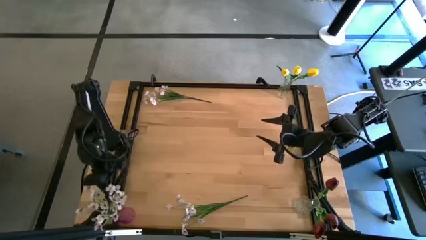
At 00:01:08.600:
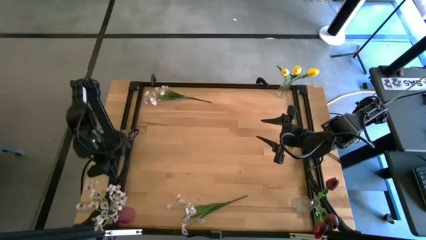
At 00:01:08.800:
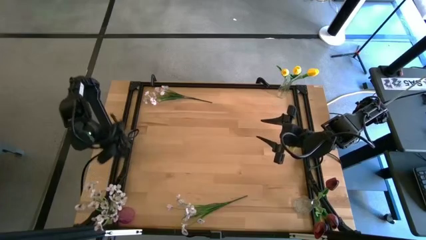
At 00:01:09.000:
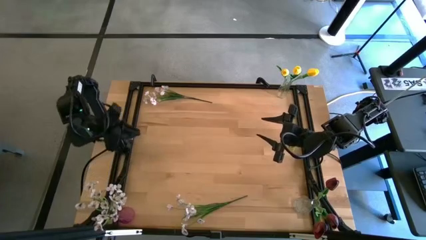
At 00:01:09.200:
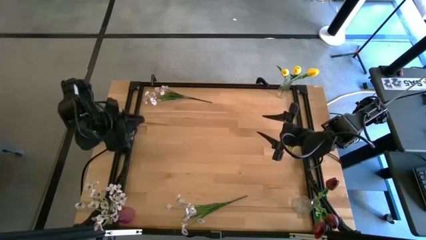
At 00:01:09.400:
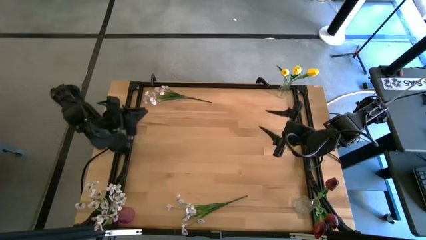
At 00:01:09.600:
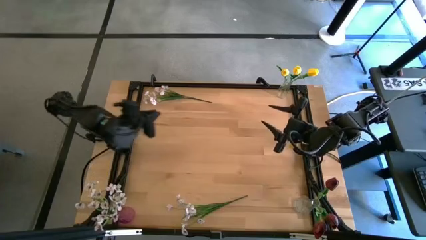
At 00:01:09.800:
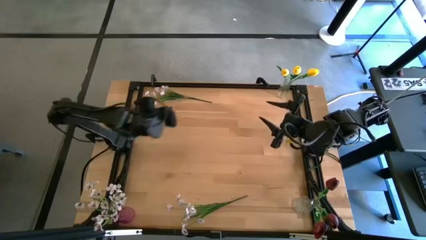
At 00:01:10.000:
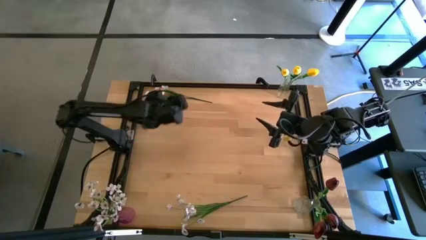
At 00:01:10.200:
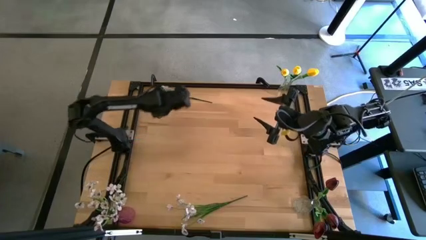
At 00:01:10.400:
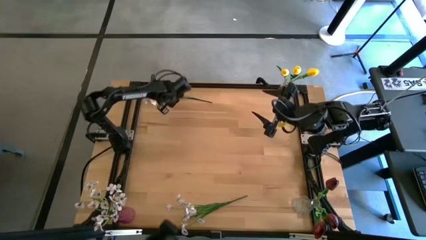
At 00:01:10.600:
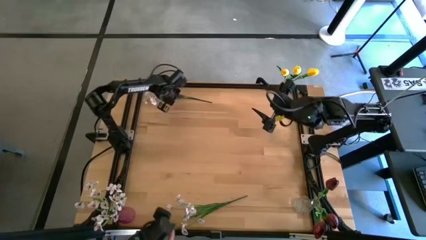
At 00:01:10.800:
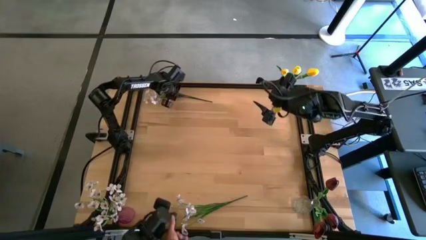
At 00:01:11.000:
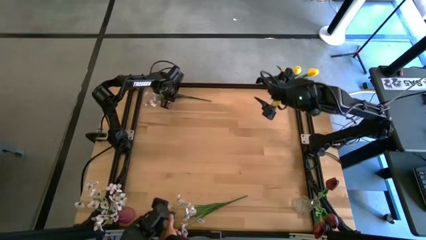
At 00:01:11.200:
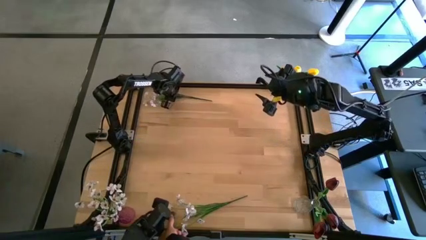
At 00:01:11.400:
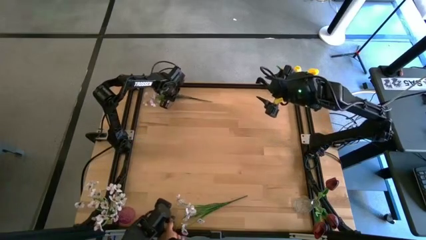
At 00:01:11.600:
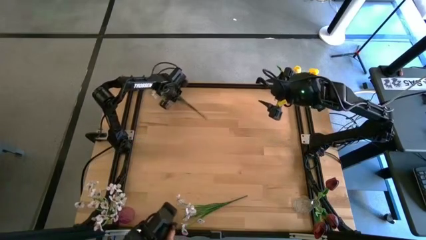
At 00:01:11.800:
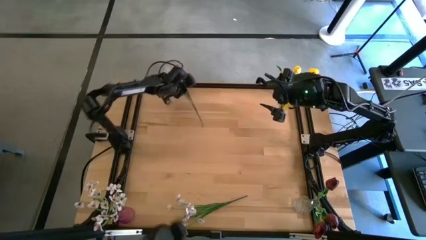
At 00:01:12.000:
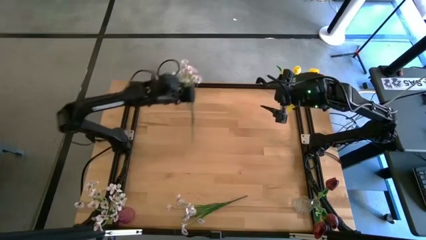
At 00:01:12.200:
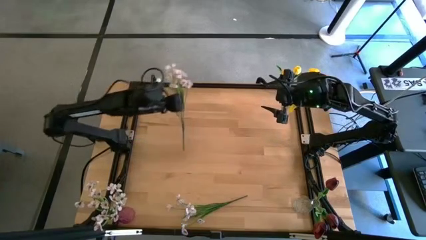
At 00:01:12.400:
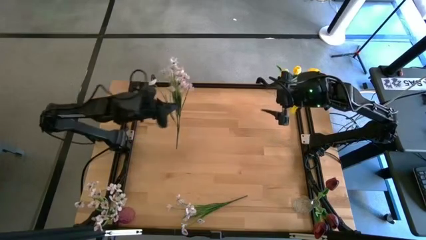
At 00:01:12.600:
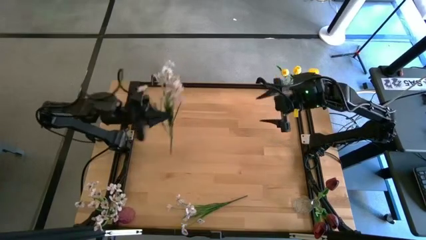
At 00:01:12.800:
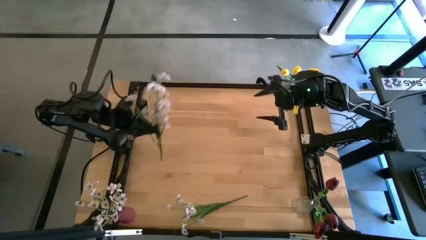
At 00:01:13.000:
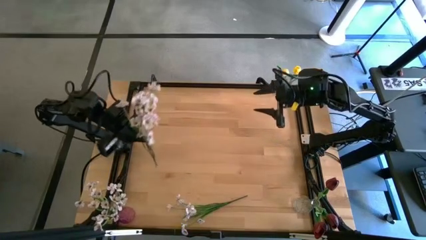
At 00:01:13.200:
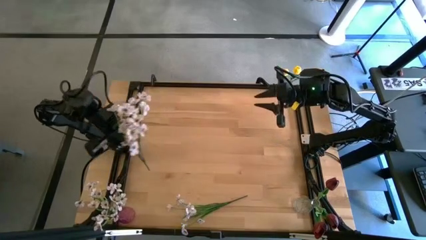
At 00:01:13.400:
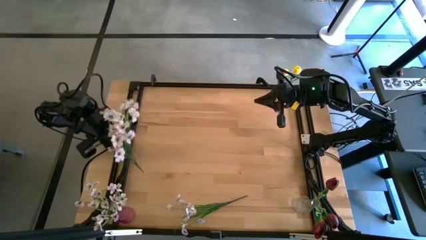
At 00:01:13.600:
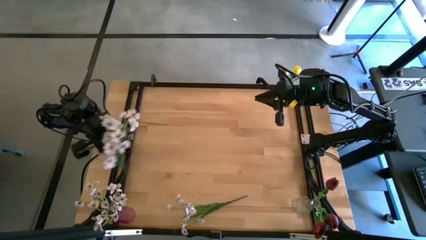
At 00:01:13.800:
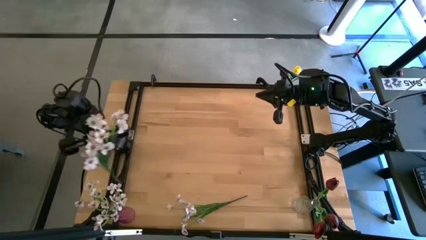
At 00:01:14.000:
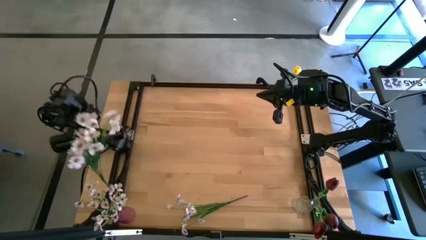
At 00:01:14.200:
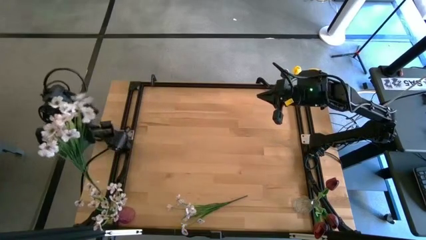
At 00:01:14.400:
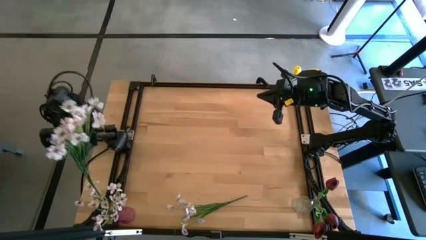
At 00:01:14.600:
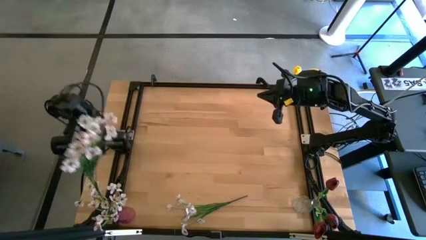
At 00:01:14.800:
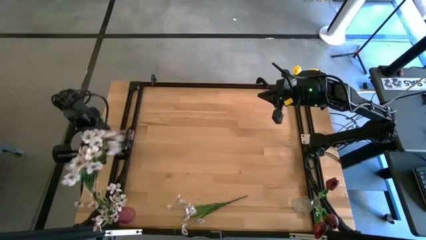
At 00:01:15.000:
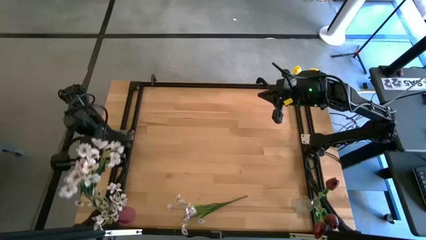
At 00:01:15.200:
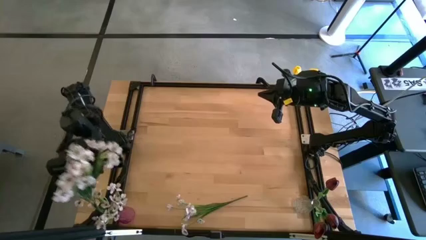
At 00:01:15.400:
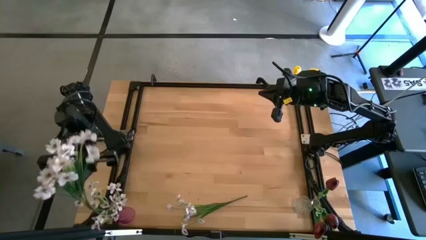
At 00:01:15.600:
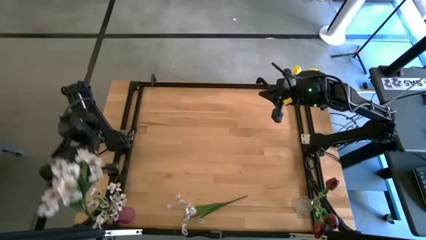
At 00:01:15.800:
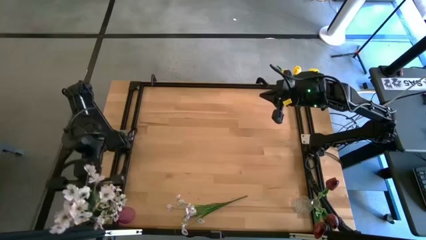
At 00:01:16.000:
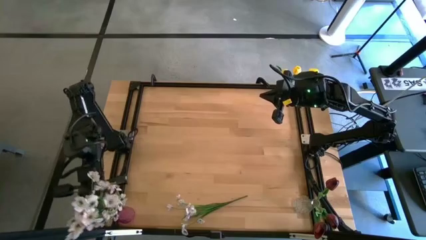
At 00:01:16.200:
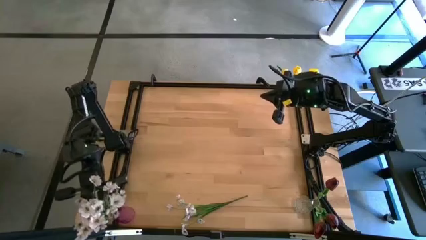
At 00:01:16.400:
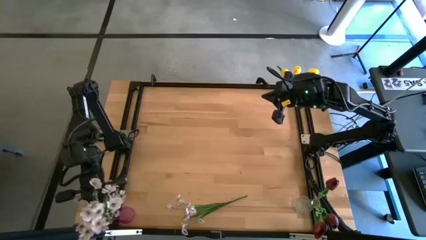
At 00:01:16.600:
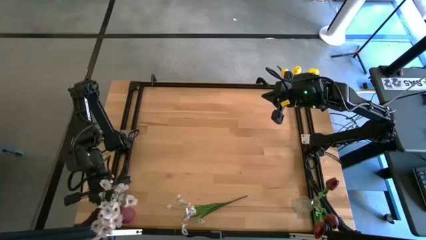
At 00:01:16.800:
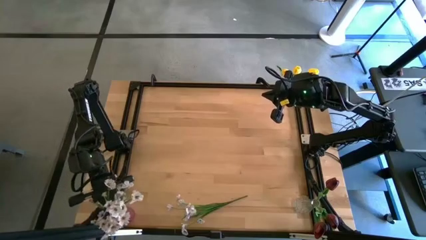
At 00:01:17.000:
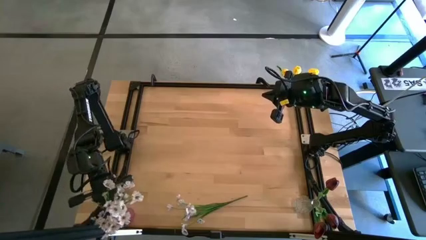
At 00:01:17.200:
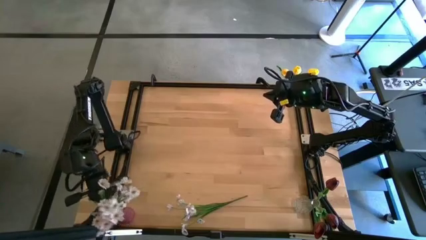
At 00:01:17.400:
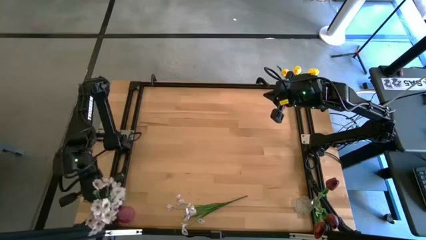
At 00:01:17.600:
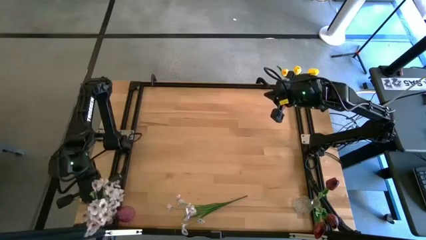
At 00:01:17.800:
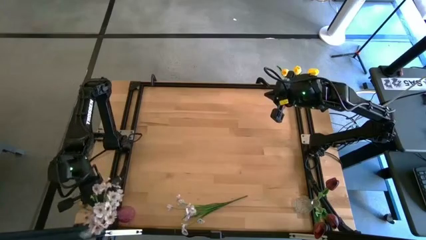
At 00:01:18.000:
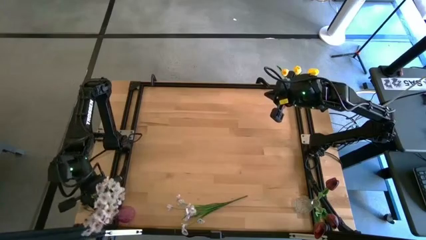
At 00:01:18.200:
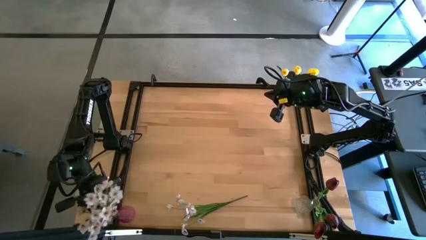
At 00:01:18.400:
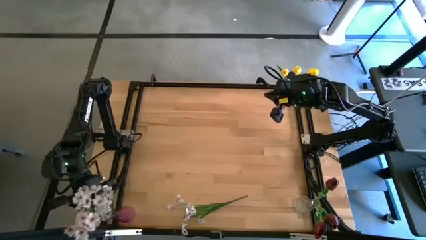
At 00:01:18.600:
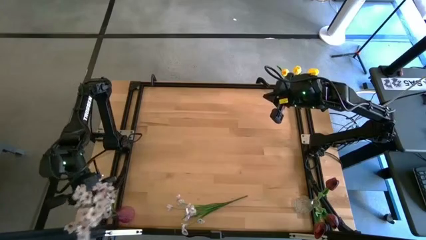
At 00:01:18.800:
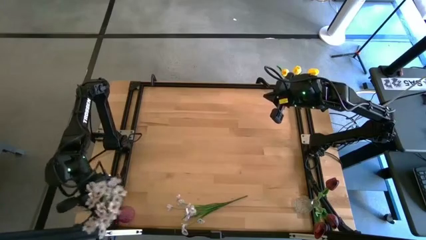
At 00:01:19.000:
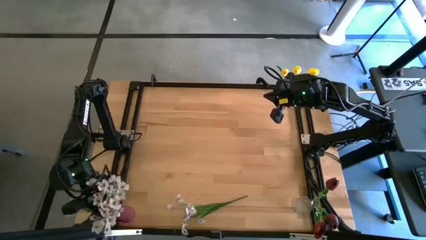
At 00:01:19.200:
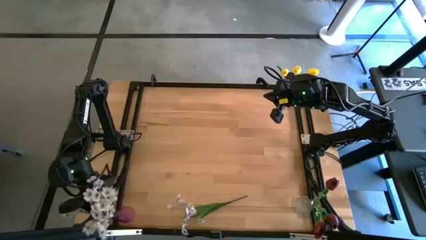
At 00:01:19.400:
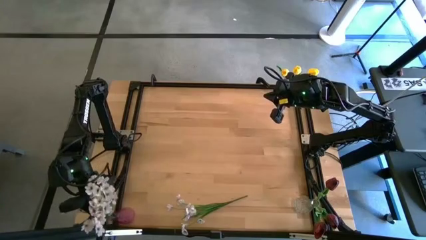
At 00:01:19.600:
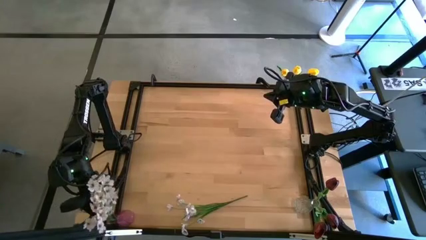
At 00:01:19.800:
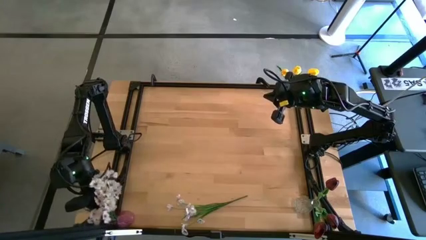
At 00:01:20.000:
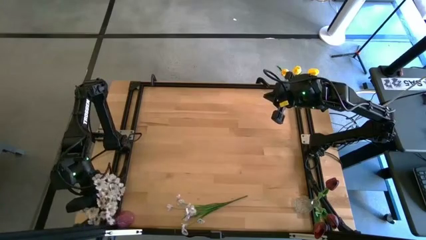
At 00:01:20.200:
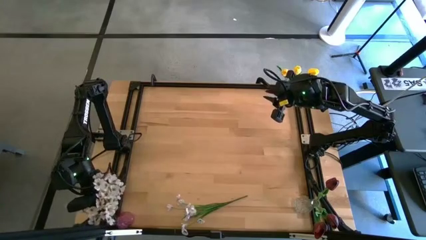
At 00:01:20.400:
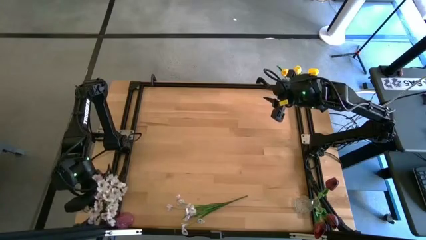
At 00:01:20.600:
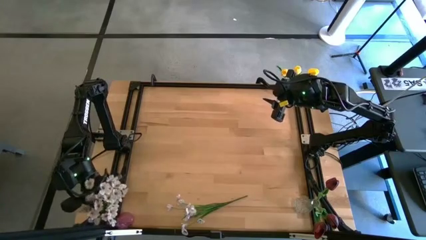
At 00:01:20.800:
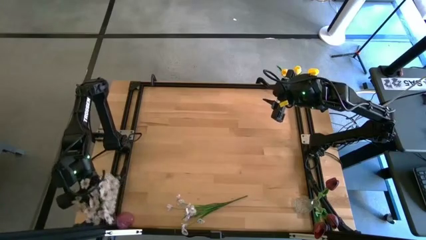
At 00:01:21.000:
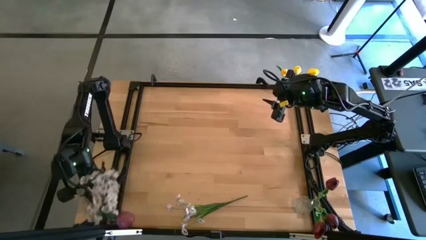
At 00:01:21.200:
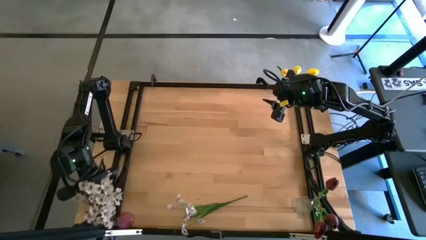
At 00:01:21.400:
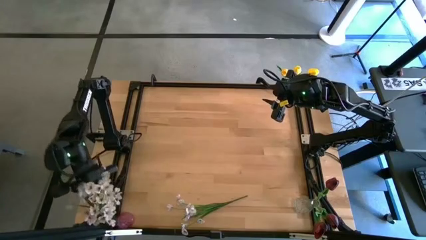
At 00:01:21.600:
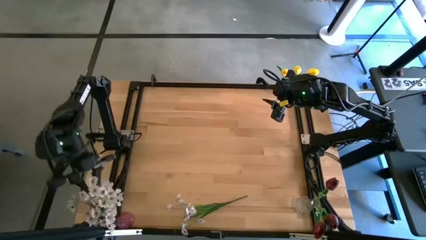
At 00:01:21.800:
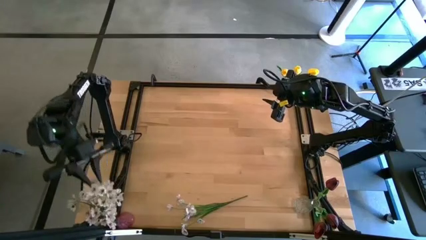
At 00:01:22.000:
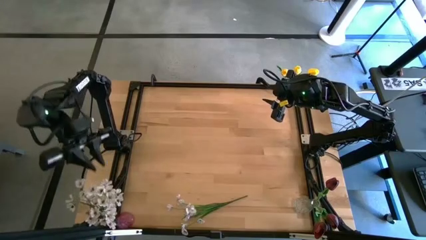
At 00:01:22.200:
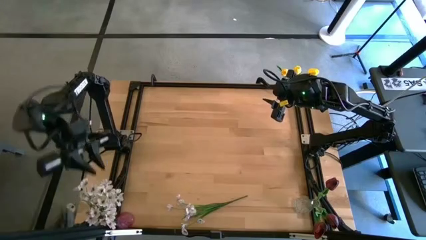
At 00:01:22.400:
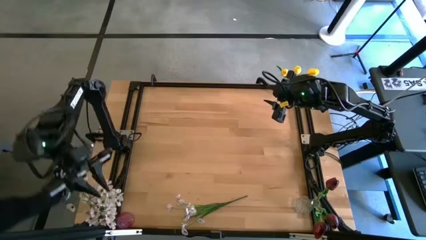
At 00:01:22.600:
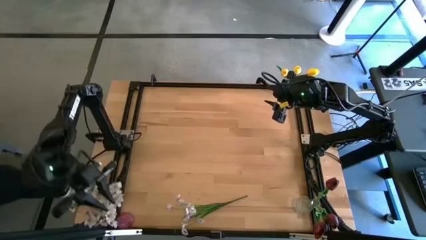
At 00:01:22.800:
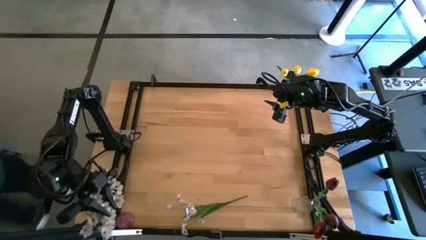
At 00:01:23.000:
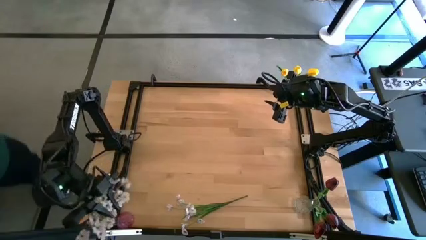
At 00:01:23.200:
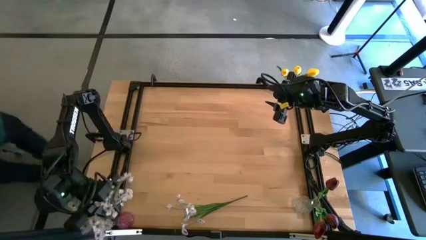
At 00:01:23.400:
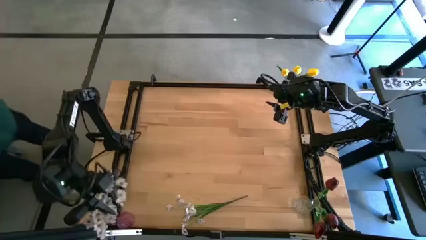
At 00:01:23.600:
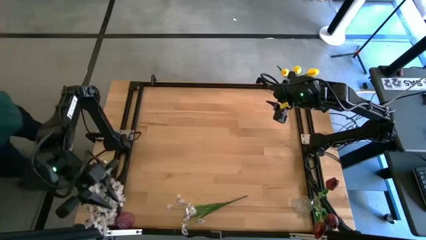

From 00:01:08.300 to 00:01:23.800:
Task: Sort flowers into vase by color
Put the top white flowers into the pink crystal vase
